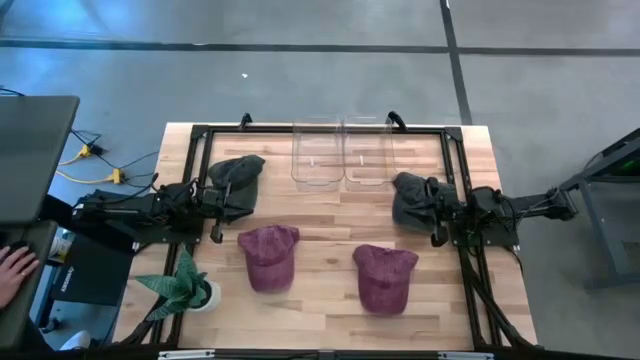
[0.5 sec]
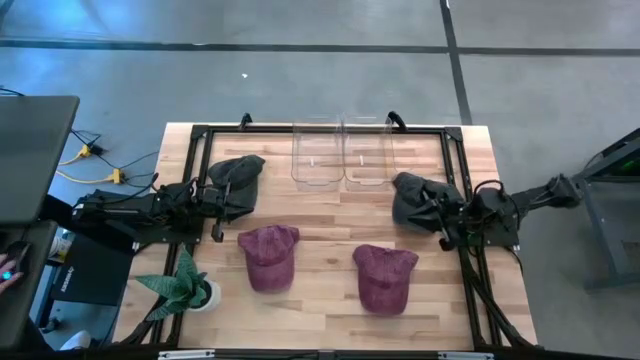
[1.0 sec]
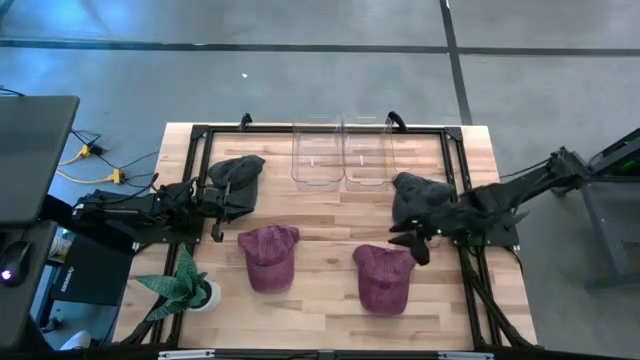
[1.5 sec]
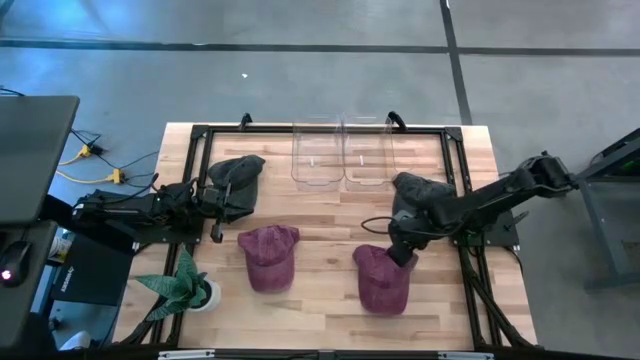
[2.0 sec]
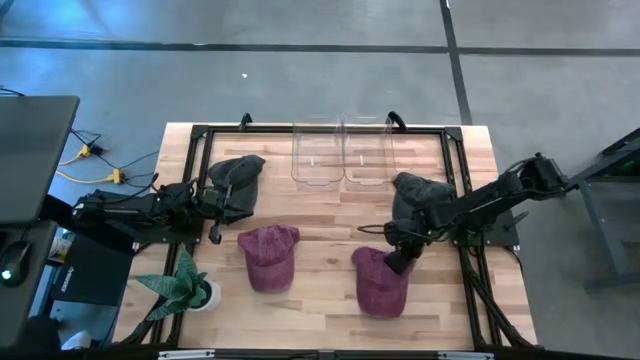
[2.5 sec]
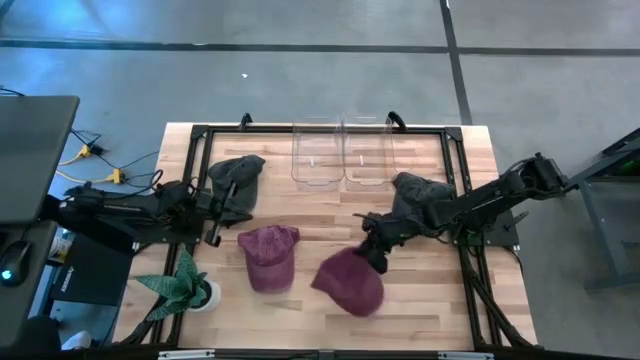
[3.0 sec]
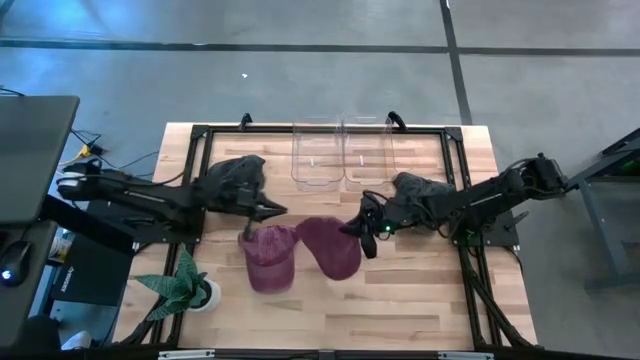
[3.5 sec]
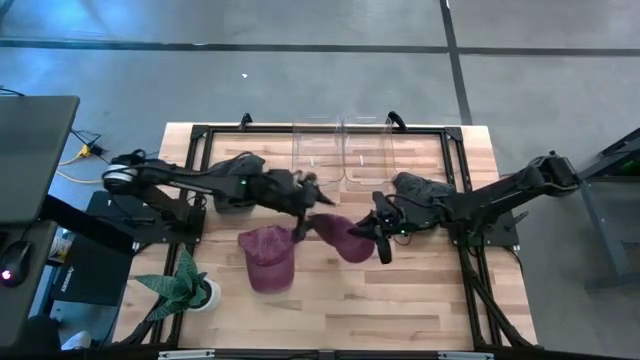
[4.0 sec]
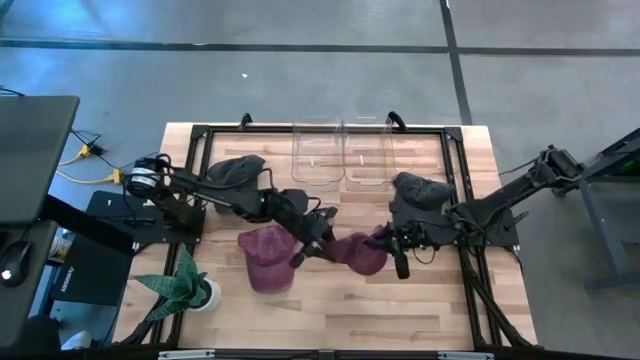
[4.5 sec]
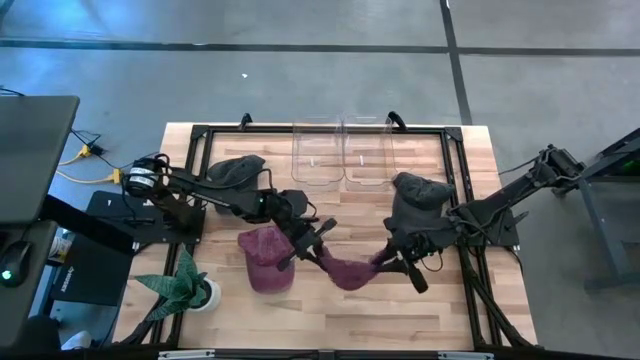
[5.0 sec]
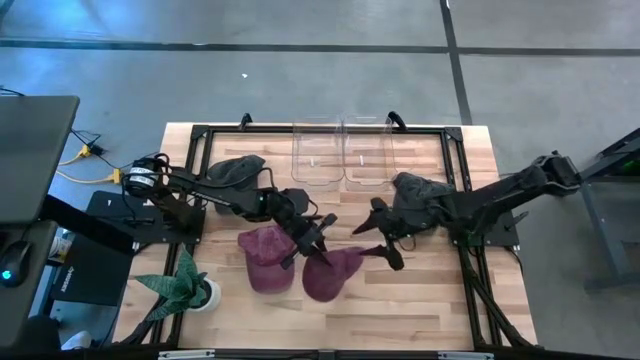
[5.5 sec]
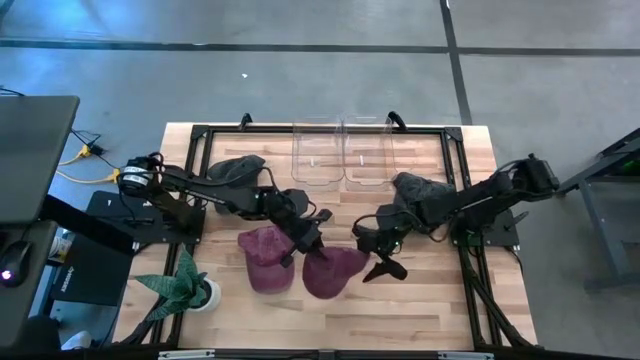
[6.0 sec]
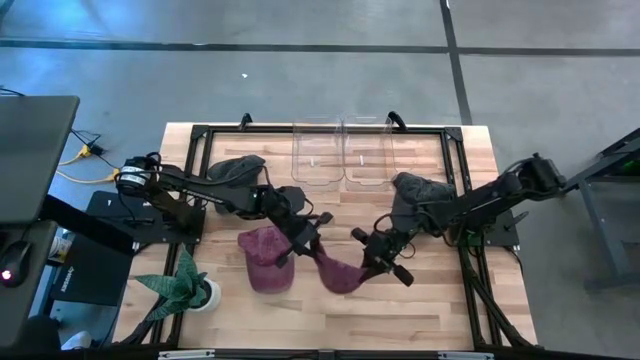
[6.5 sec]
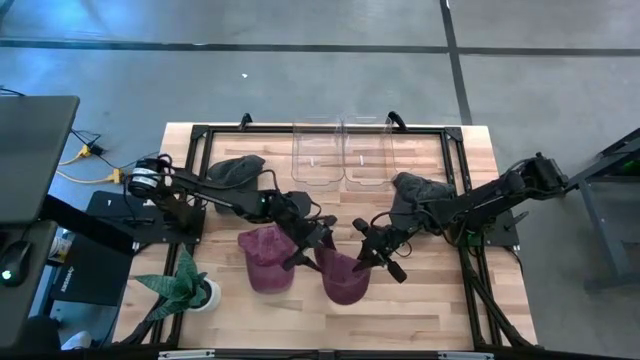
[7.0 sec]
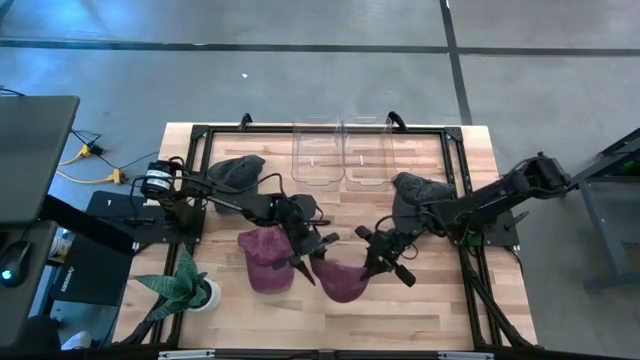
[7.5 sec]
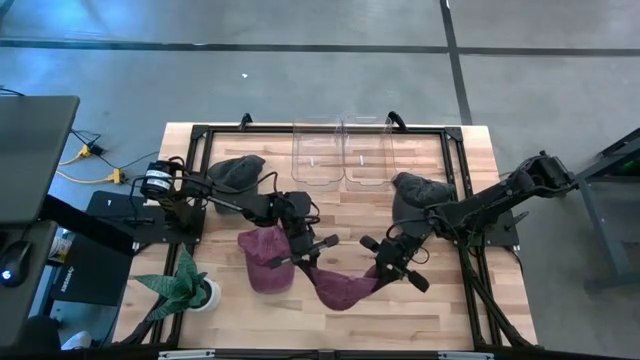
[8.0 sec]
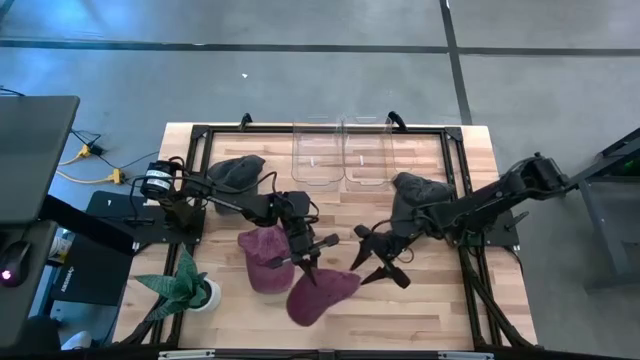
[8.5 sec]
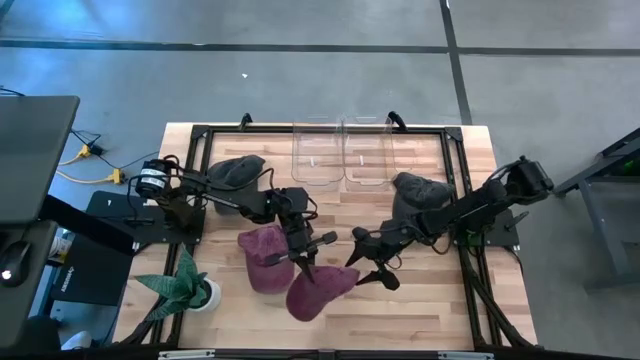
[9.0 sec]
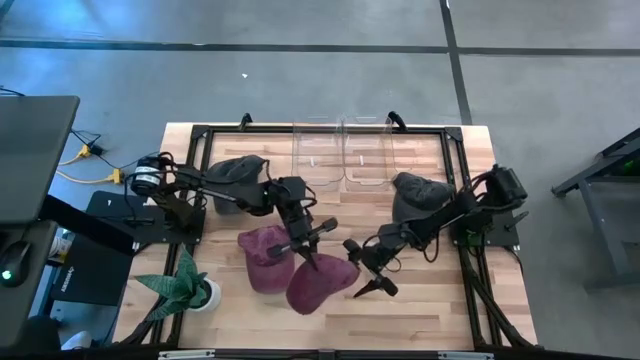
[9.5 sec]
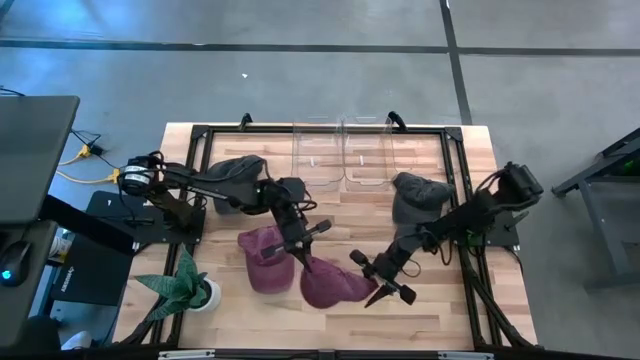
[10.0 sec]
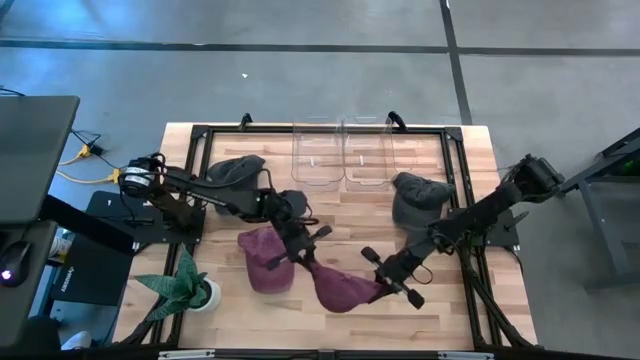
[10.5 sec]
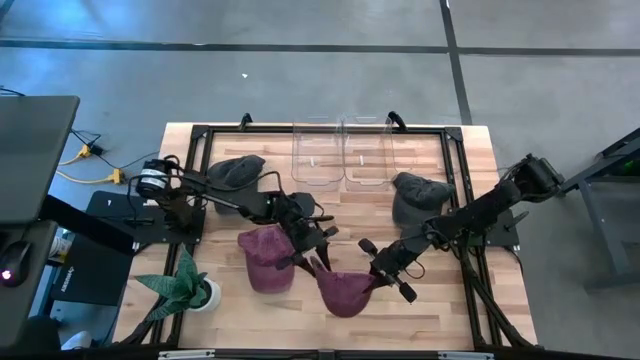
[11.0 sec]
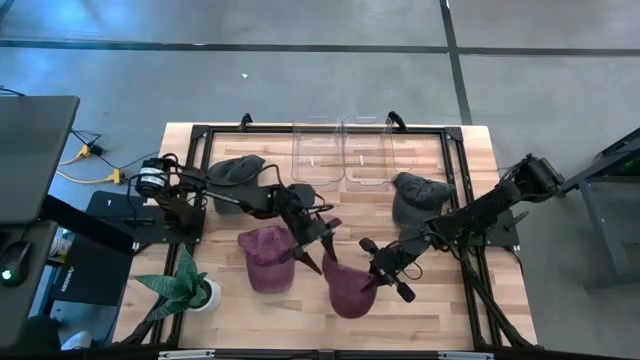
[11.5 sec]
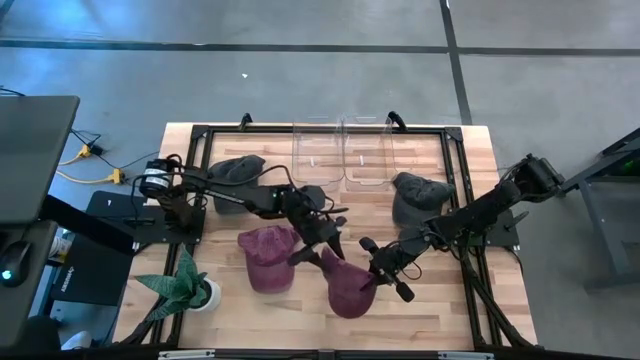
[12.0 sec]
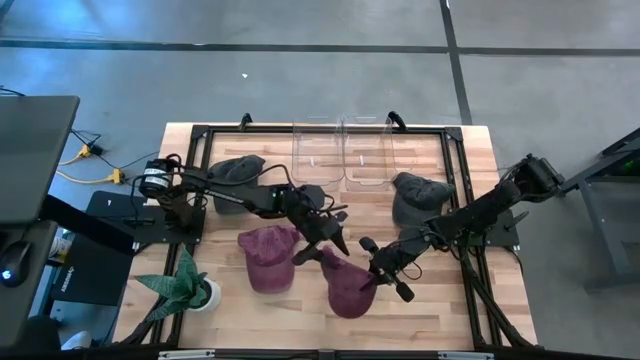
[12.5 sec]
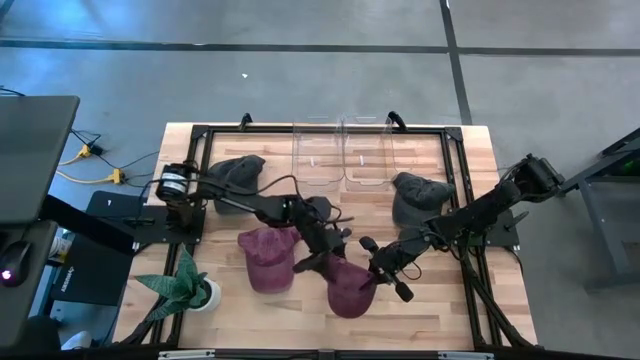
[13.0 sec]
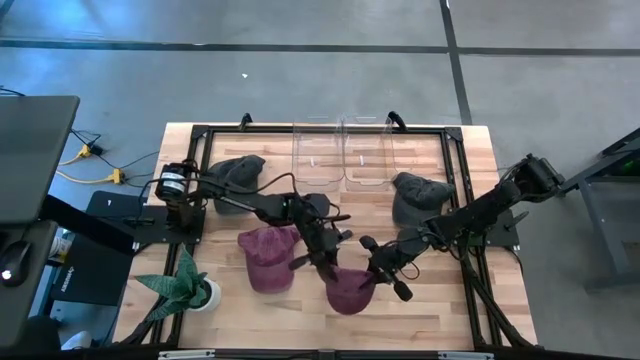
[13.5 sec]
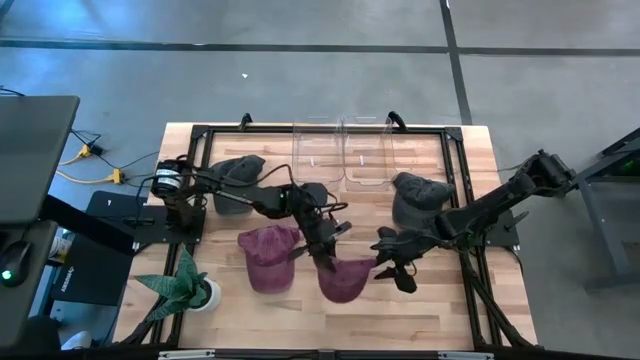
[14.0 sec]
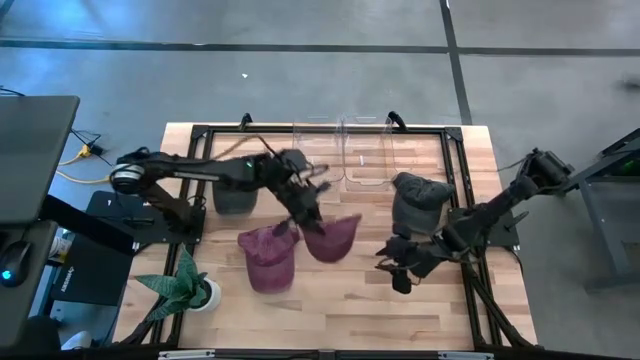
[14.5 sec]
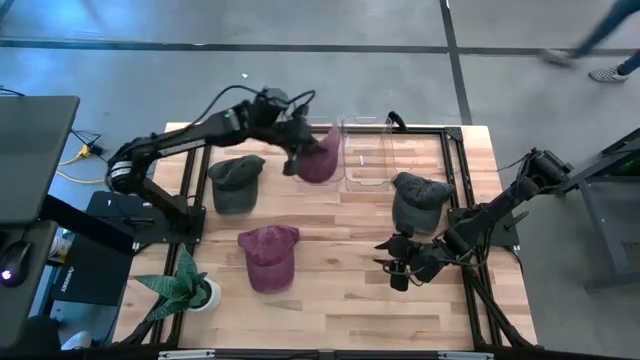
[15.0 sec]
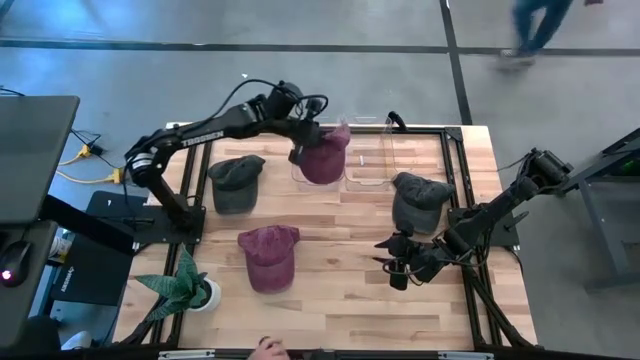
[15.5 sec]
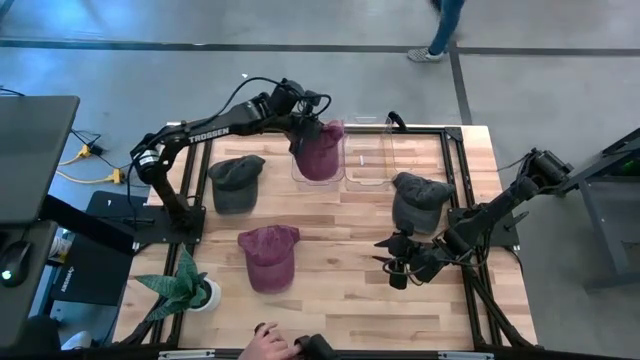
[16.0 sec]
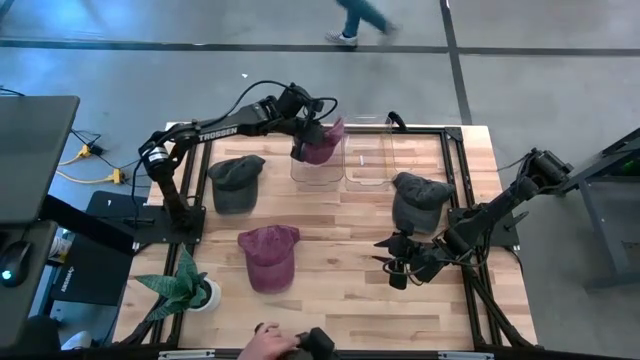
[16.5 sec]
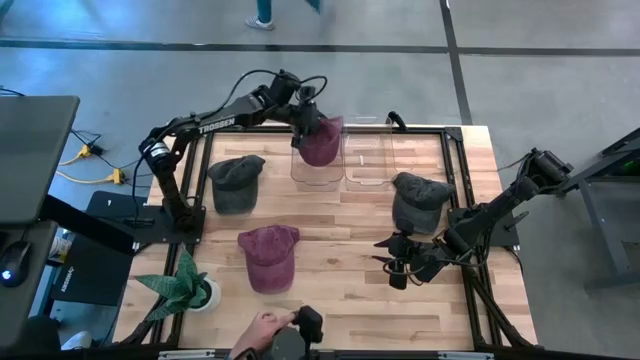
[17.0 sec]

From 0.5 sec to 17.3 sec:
Task: Pick & Place hat
Put the right red cap into the left transparent bin

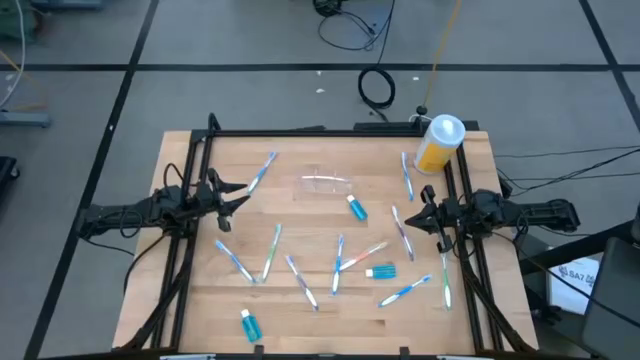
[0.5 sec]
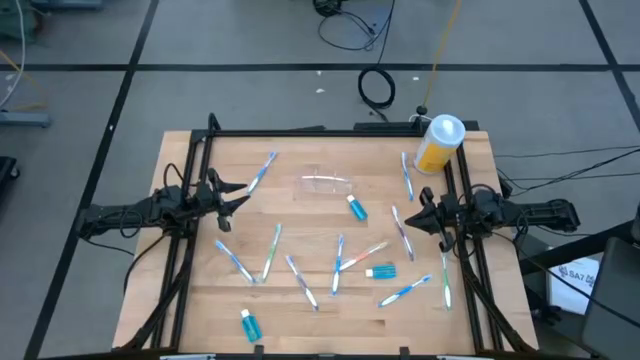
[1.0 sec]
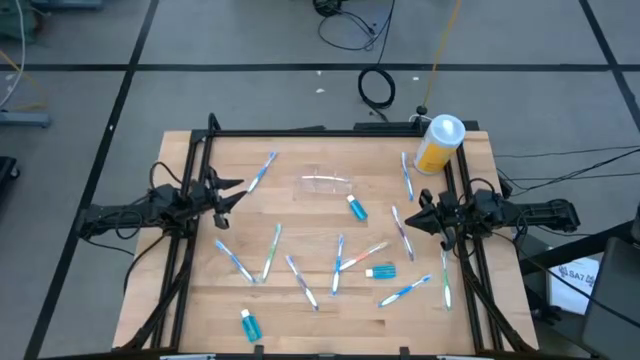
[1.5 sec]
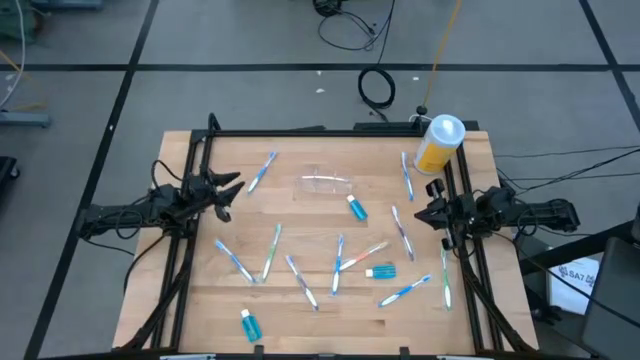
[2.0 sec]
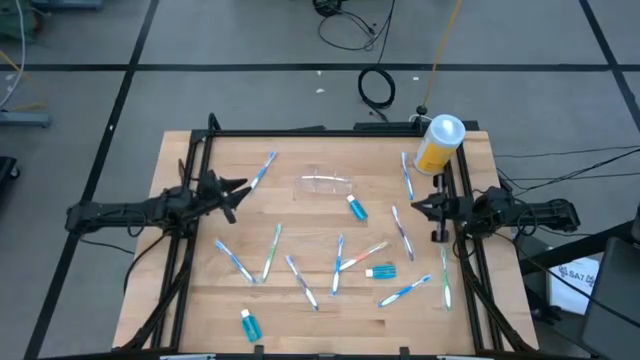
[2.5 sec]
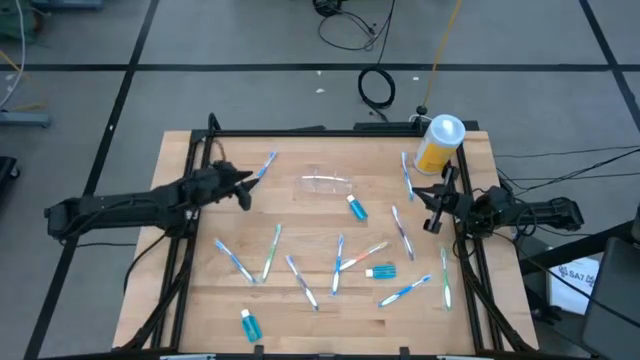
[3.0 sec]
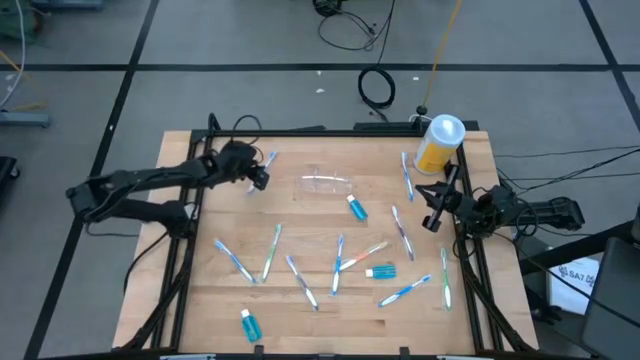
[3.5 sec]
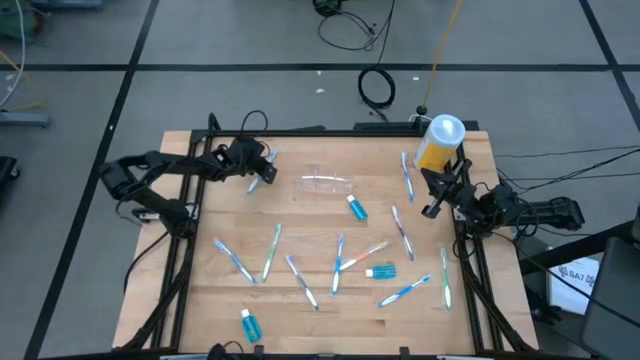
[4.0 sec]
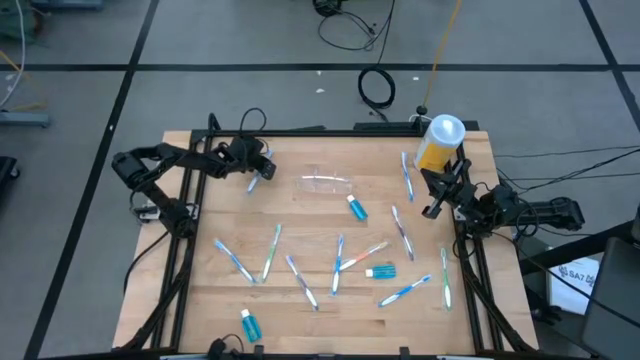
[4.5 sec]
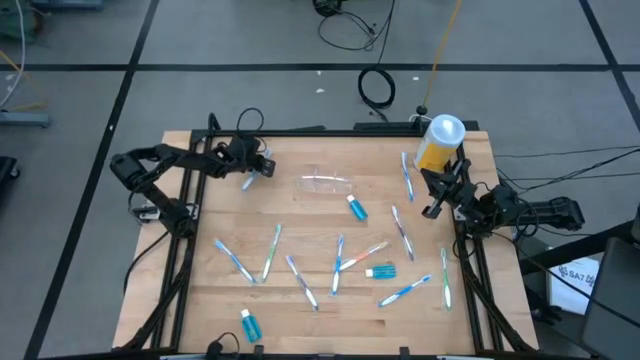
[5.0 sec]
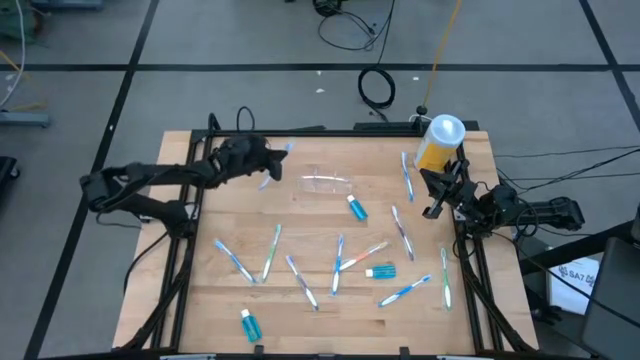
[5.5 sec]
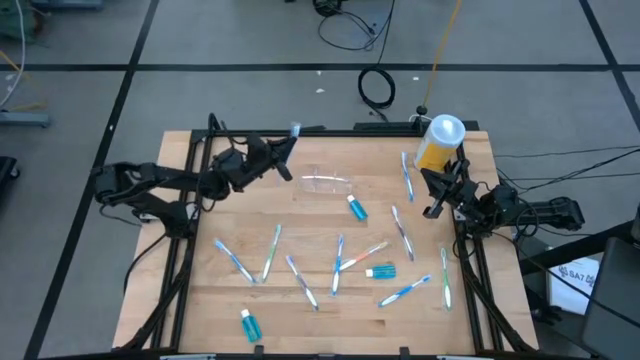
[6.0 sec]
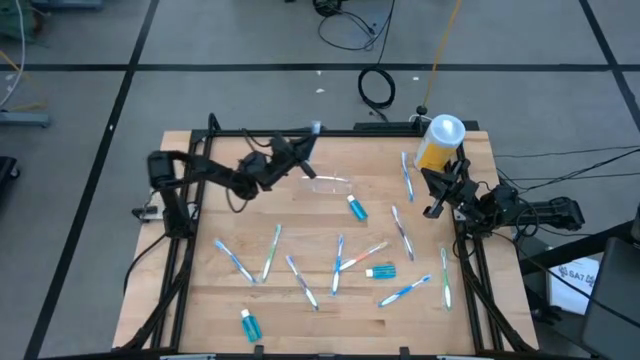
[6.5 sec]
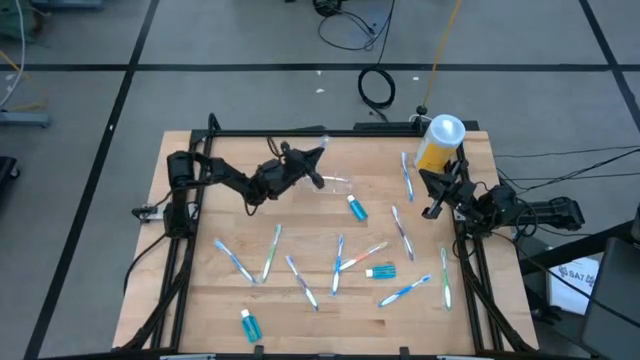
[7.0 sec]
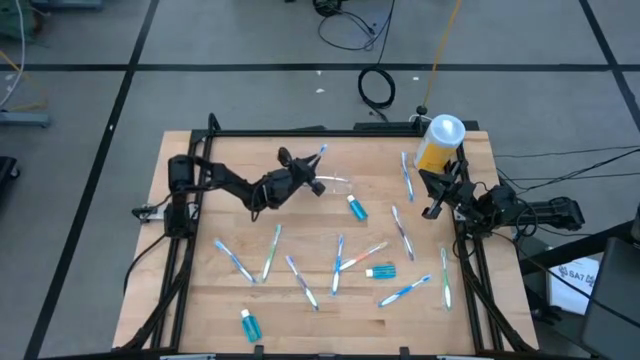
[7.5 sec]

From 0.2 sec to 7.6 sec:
Task: Pick & Place toothbrushing station
Put the blue toothbrush into the transparent organizer
